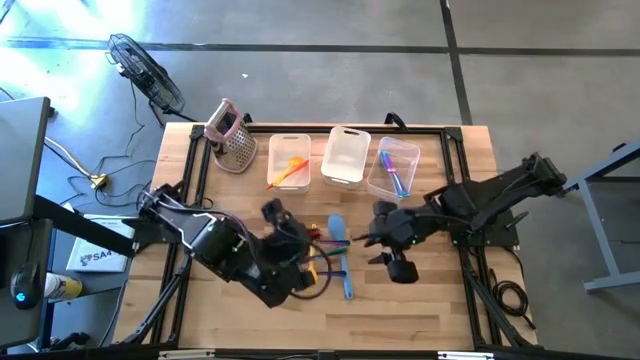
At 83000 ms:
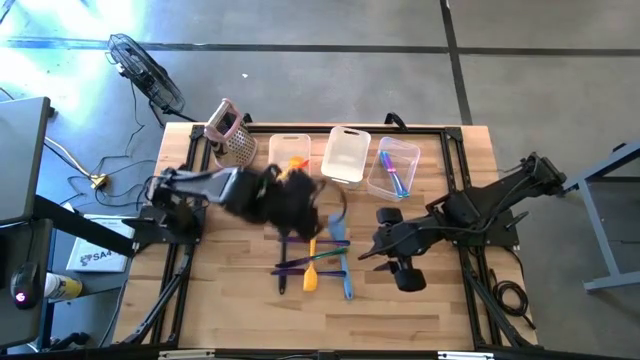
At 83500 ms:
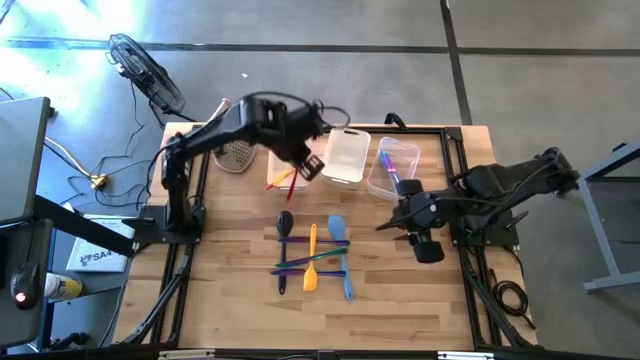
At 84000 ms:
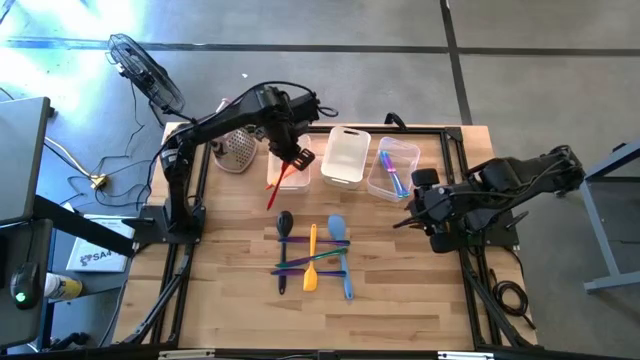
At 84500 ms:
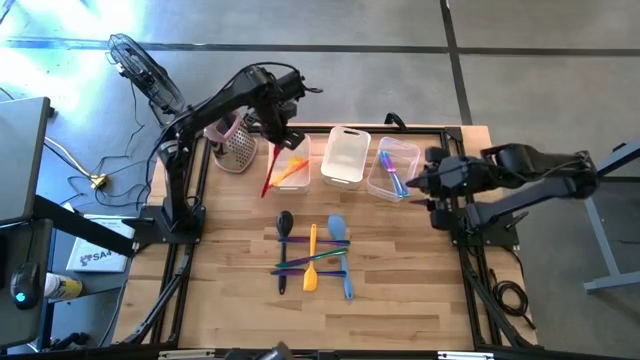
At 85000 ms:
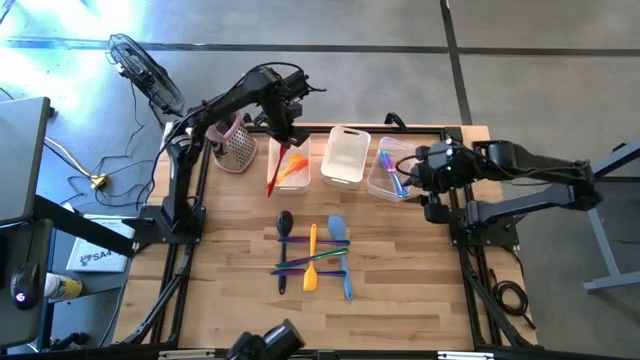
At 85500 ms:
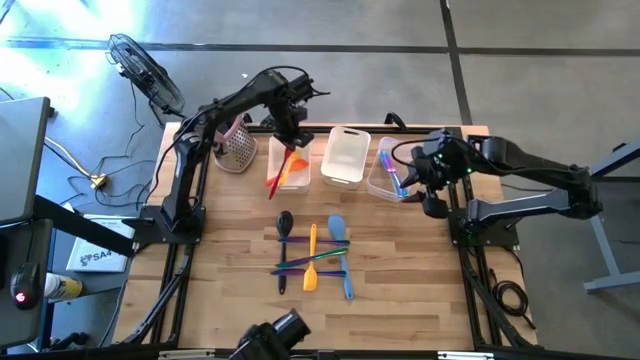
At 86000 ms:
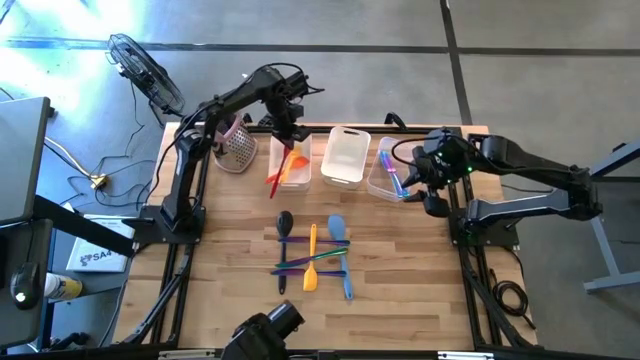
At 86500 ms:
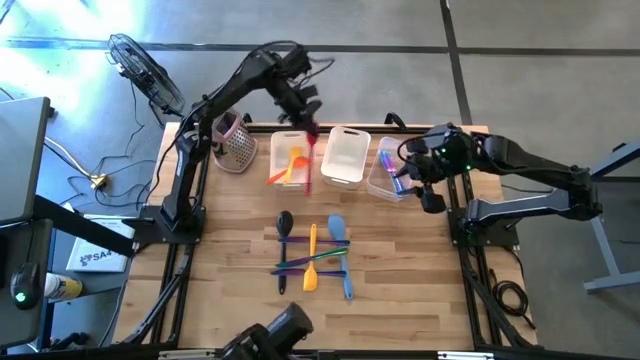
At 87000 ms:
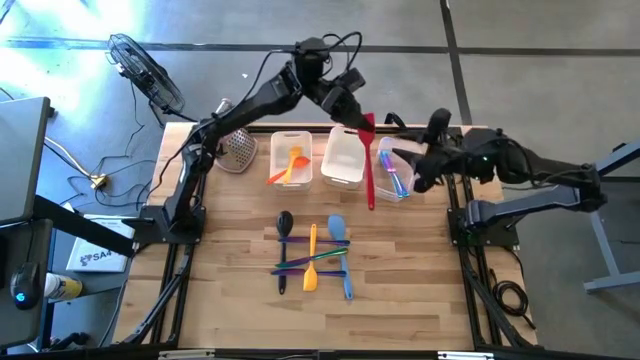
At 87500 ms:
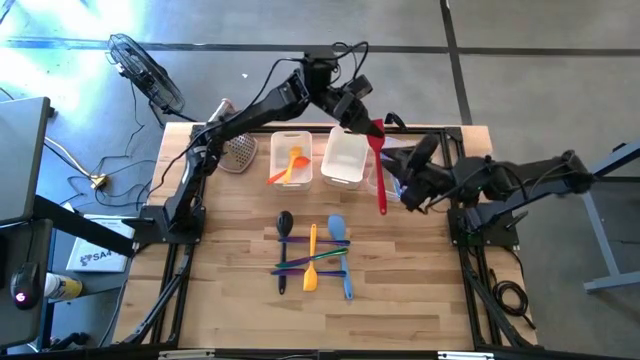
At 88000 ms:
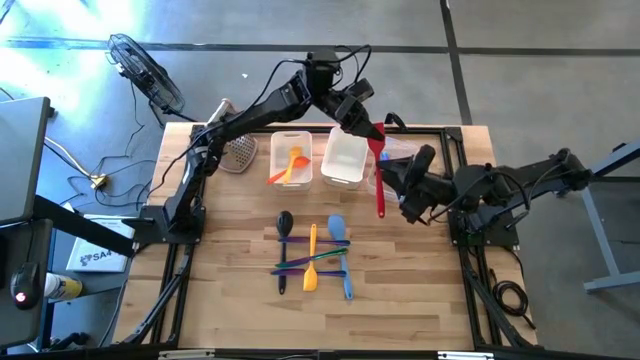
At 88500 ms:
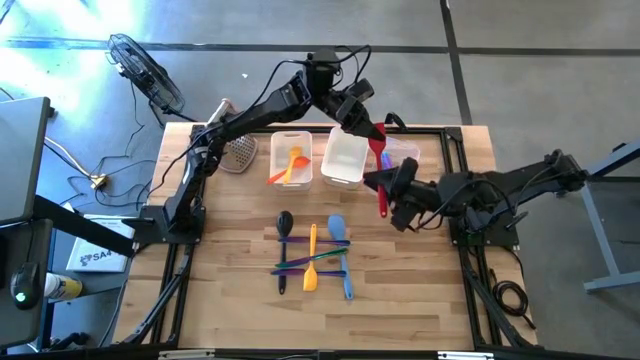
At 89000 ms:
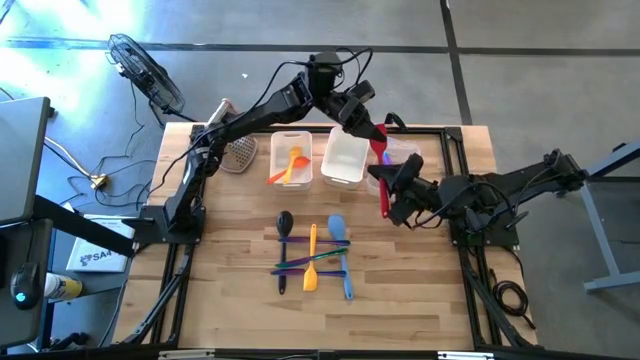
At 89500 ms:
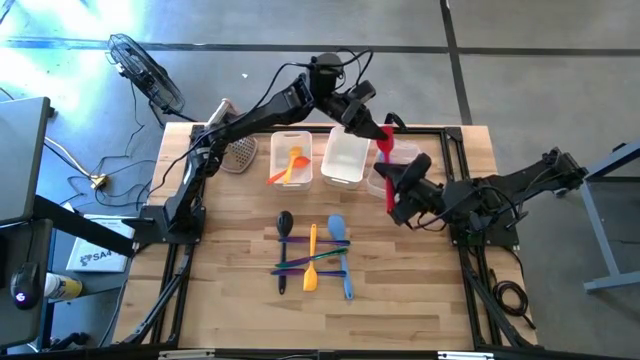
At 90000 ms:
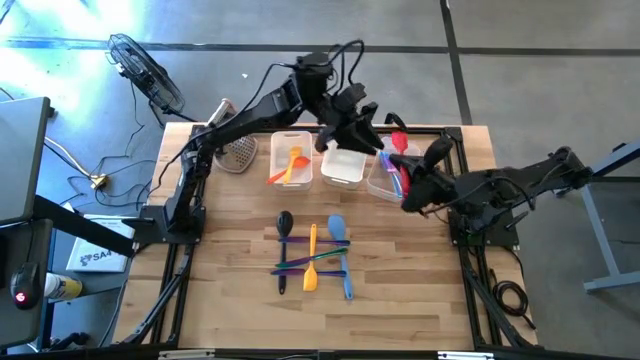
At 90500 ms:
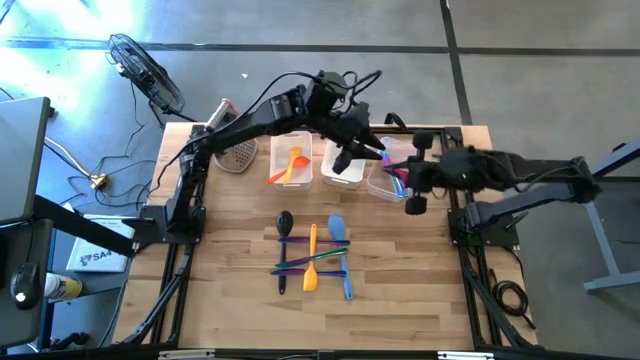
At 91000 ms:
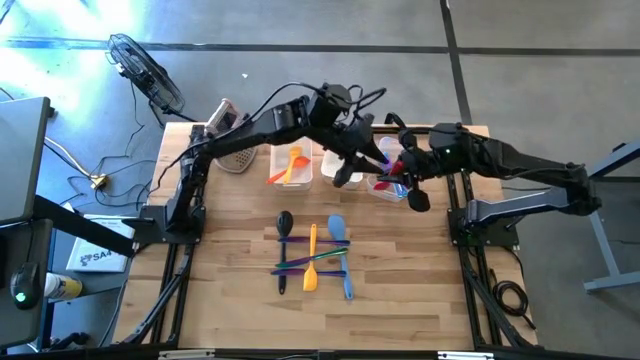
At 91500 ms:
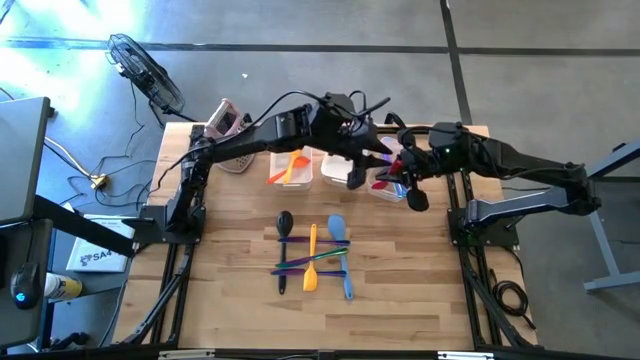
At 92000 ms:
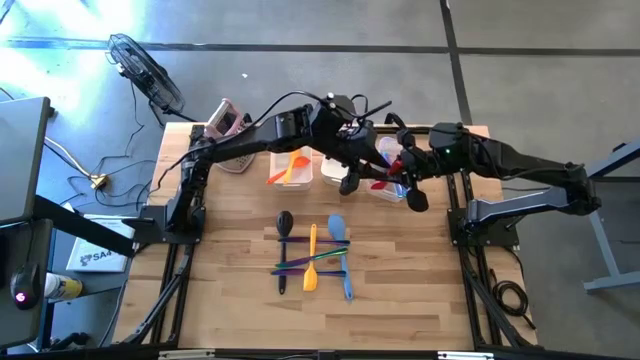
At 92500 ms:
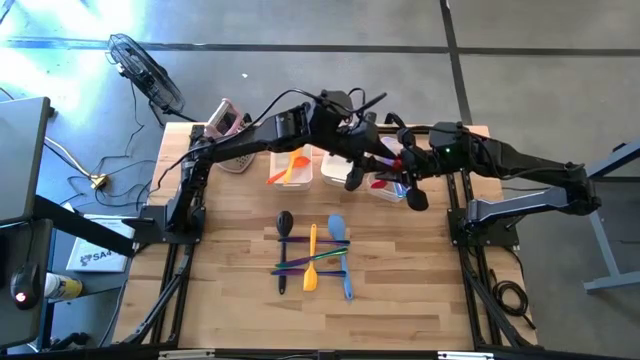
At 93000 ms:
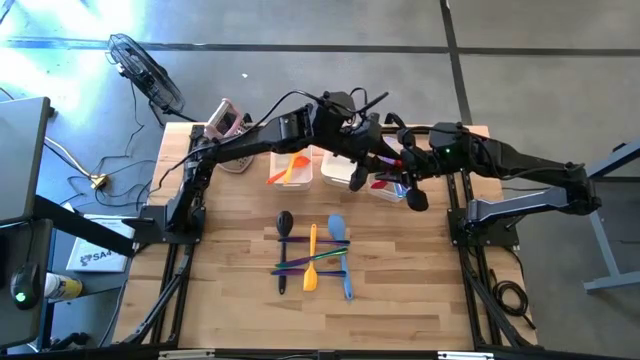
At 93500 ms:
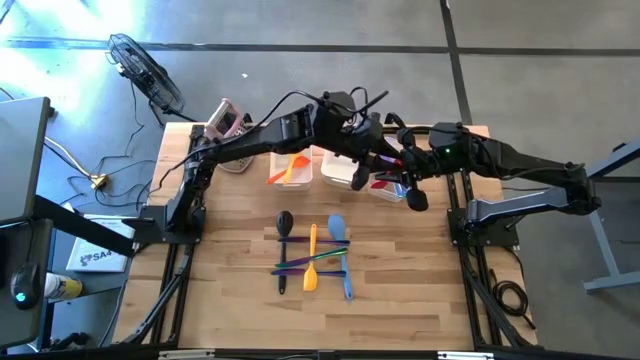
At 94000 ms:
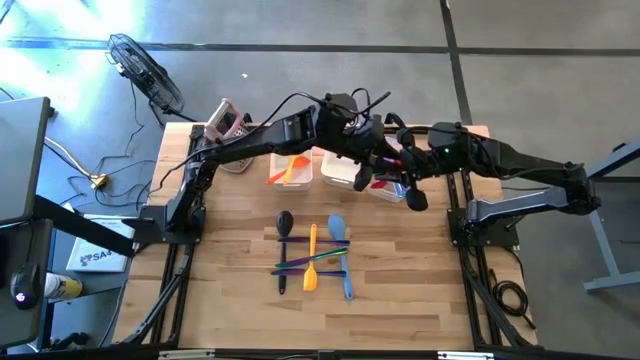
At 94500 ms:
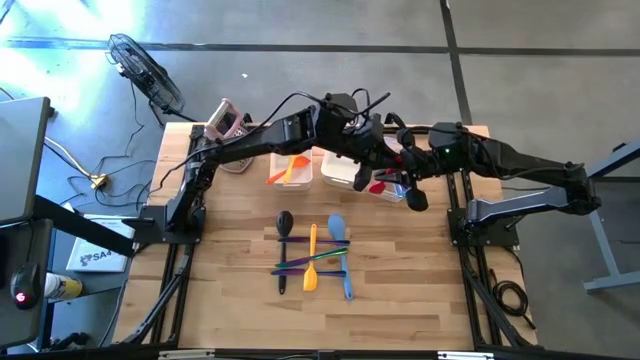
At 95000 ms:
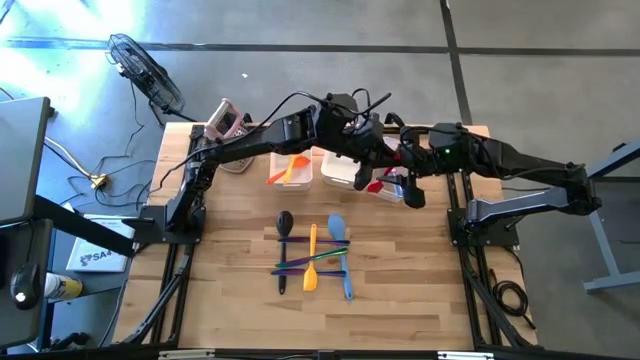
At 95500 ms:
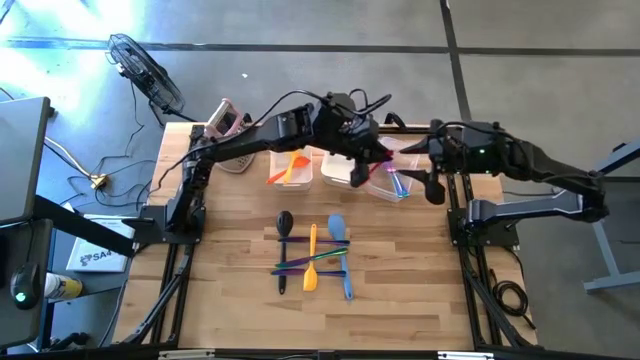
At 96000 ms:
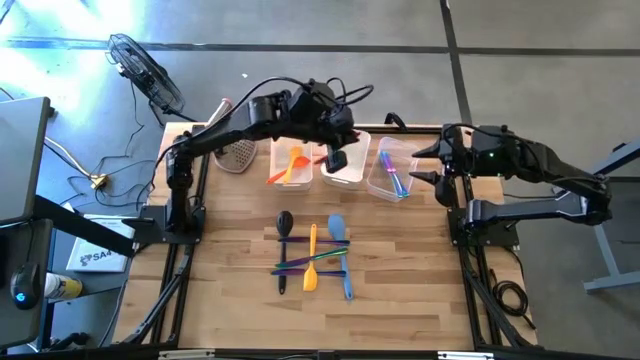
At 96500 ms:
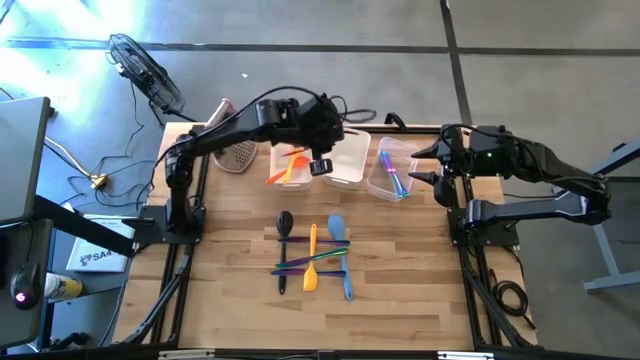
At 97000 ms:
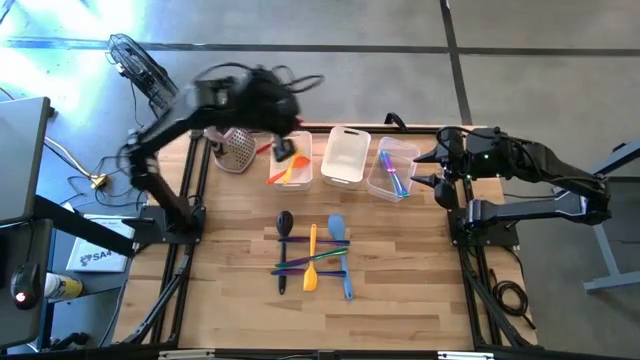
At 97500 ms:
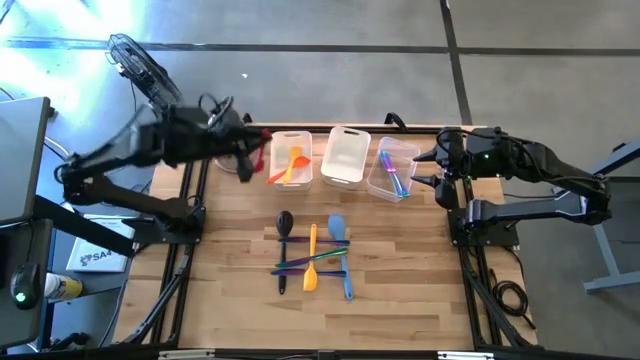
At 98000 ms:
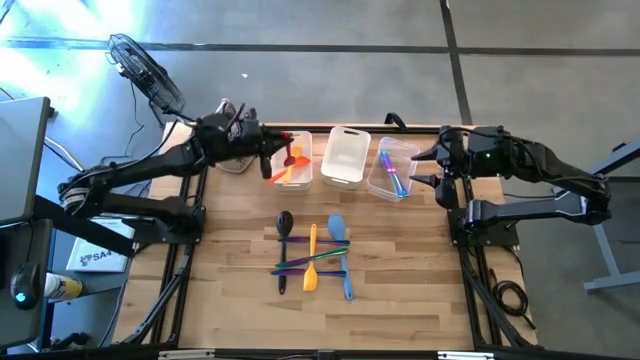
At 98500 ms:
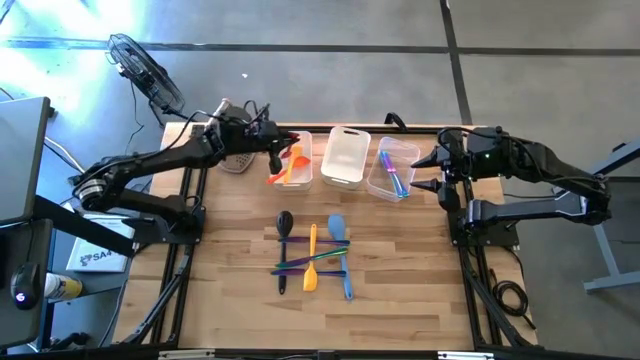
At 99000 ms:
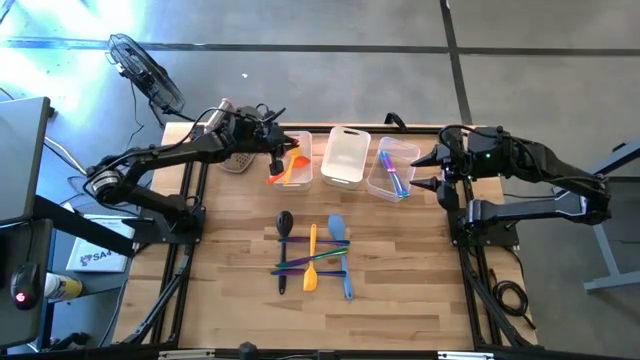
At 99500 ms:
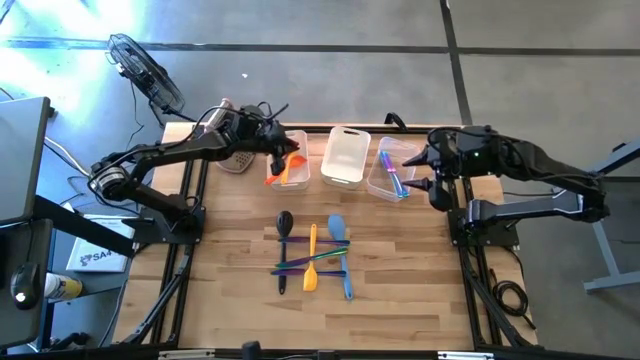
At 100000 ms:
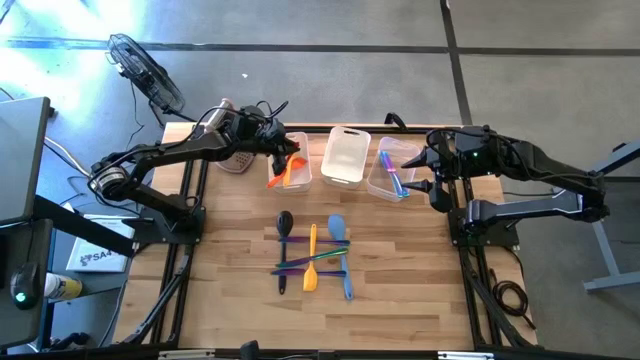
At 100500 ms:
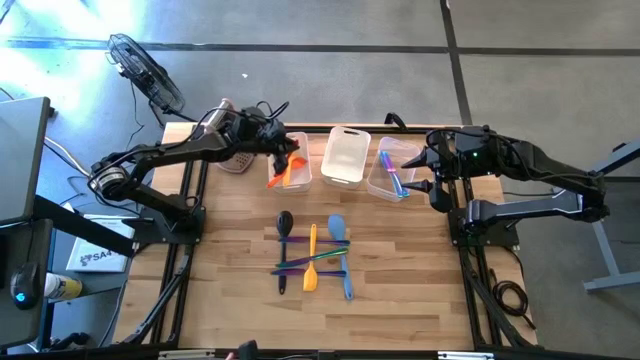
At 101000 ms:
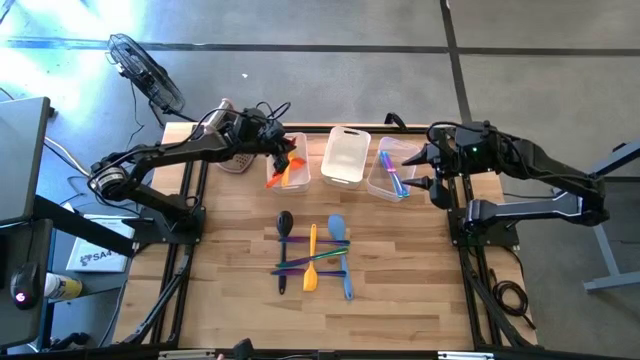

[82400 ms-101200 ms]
Task: Pick & Place Kitchen Items
Put the red spatula into the left white bin

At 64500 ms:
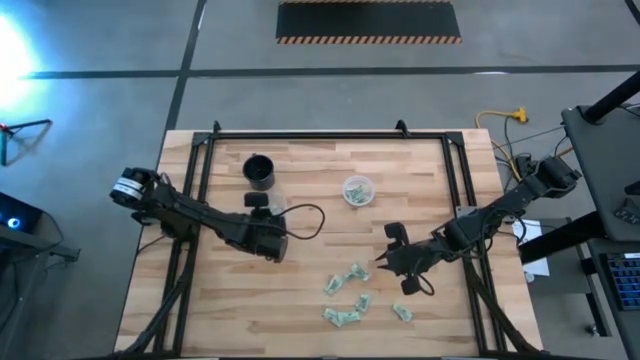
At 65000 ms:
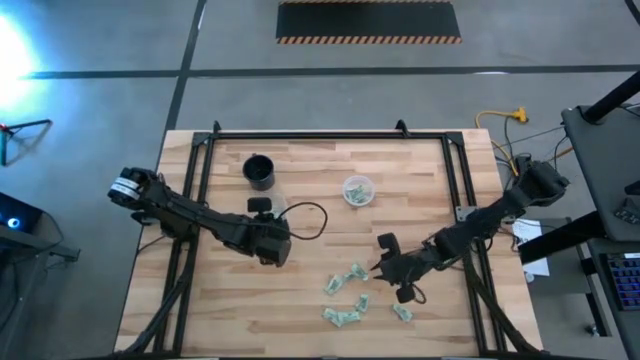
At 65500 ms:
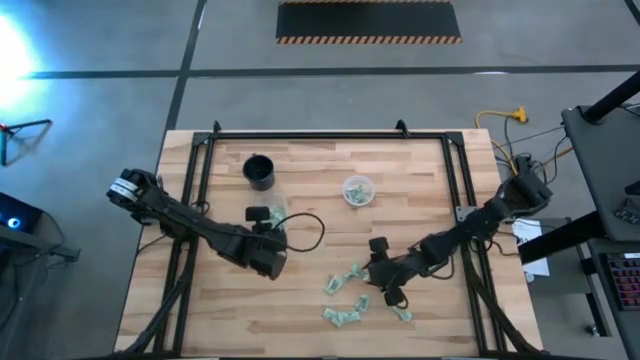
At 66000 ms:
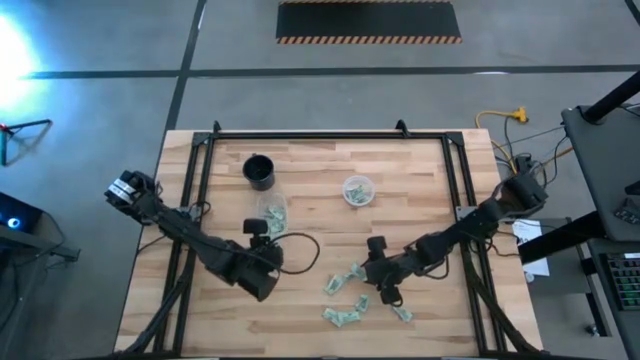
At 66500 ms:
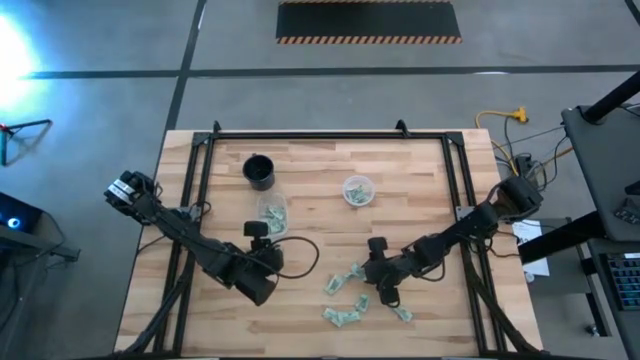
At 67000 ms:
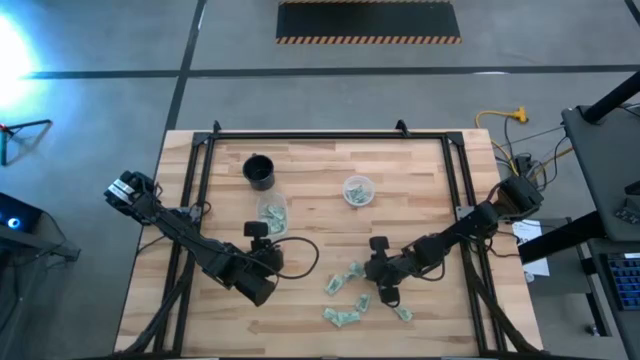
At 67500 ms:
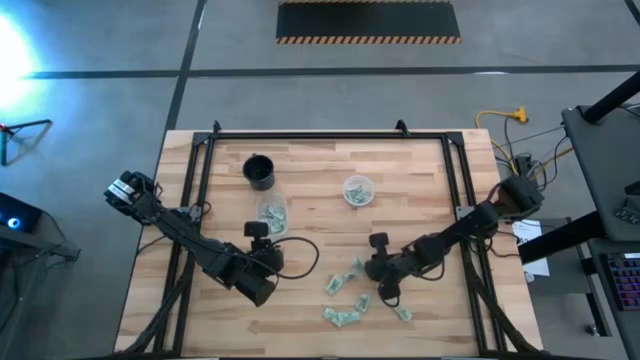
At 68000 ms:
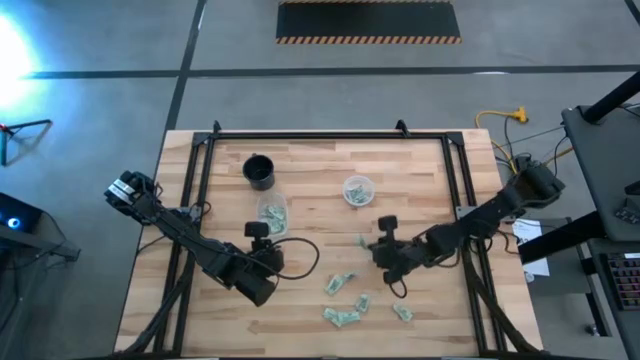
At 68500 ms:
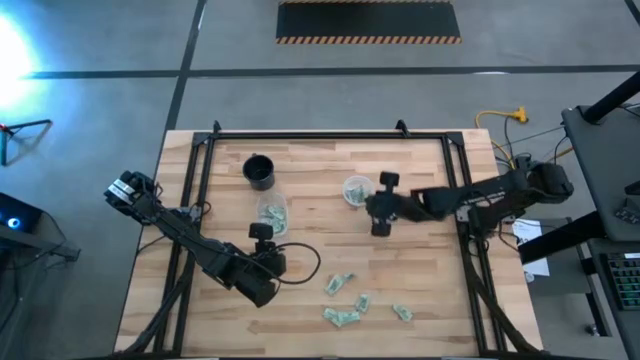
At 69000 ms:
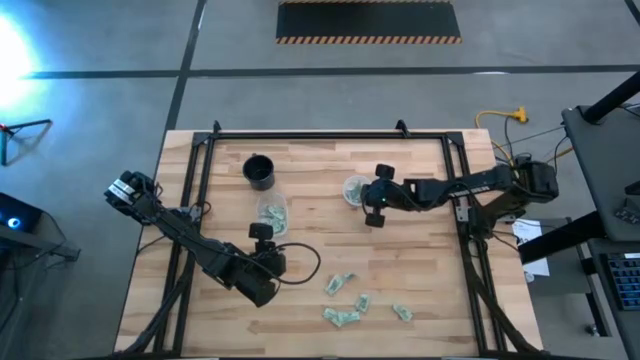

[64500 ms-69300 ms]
Task: Pick and place items into bin
Put the stevia packet into the right transparent bin
